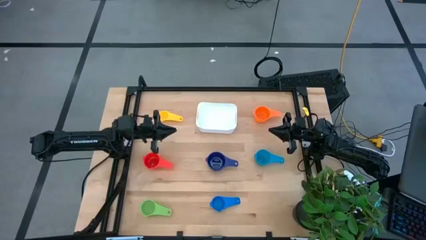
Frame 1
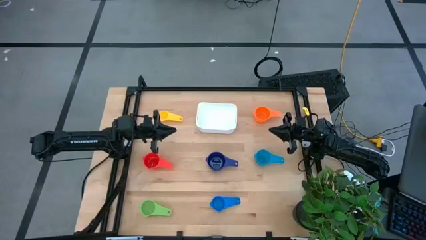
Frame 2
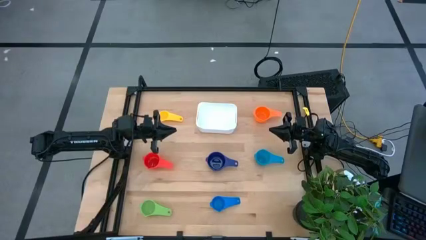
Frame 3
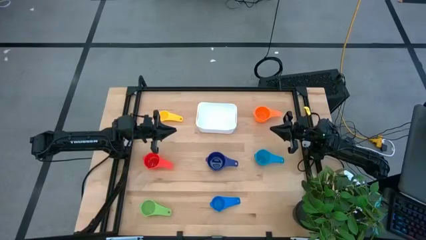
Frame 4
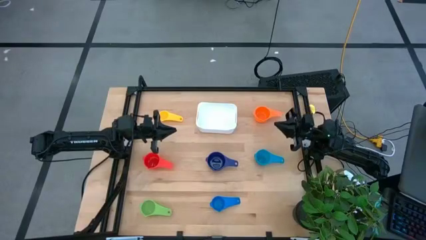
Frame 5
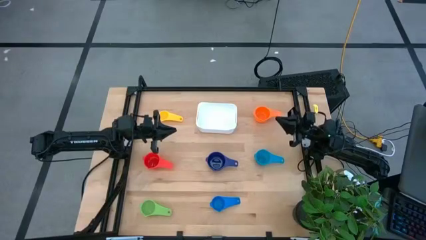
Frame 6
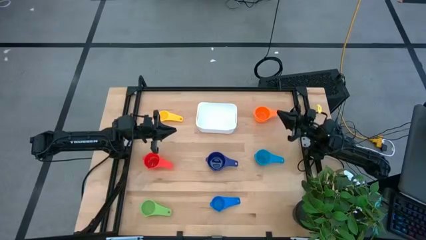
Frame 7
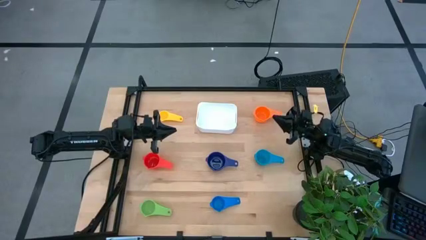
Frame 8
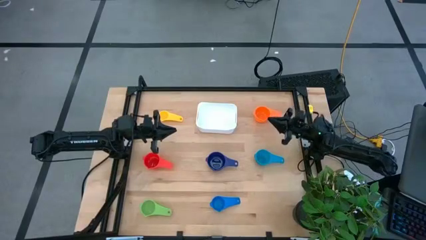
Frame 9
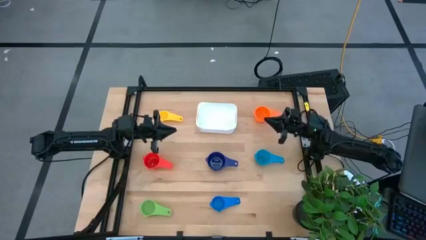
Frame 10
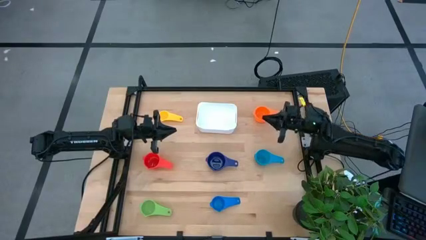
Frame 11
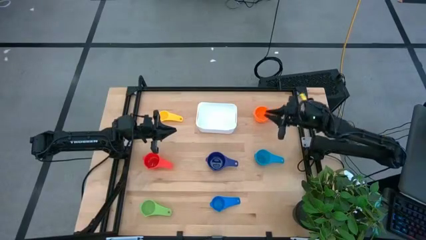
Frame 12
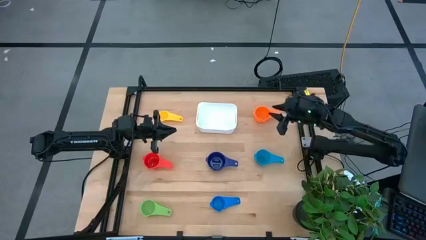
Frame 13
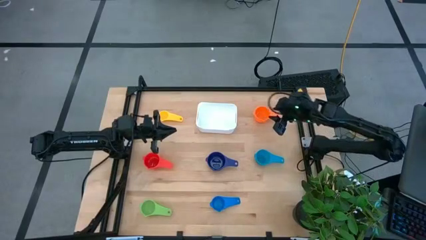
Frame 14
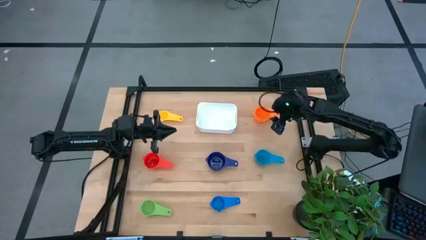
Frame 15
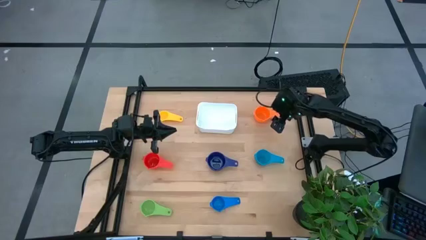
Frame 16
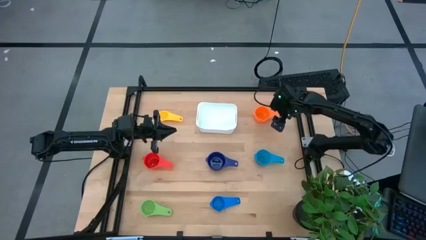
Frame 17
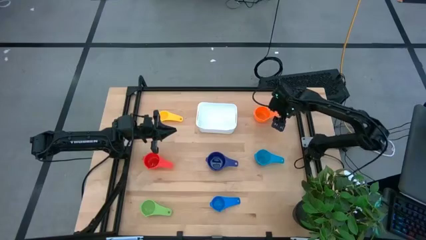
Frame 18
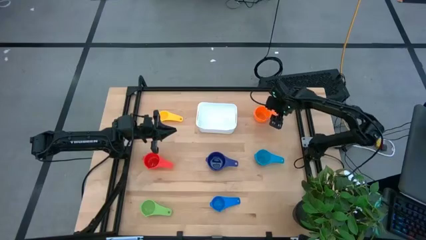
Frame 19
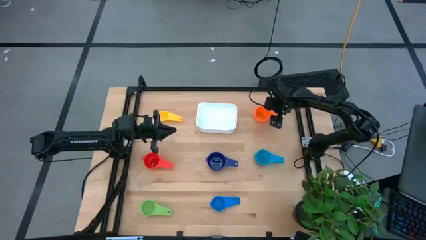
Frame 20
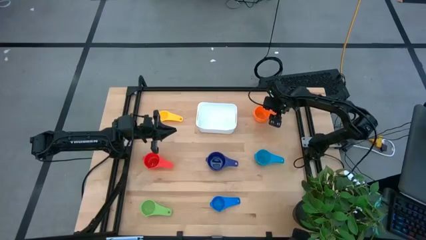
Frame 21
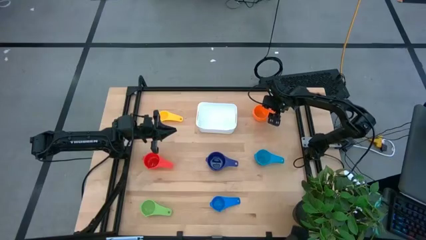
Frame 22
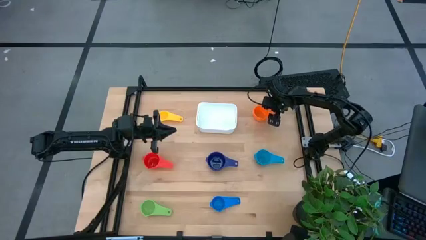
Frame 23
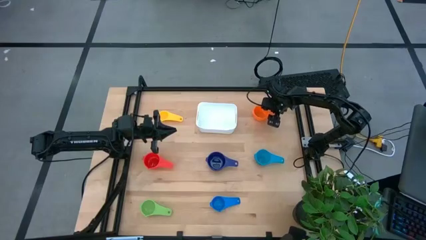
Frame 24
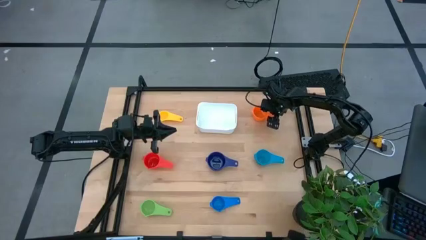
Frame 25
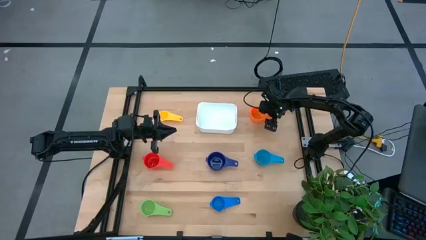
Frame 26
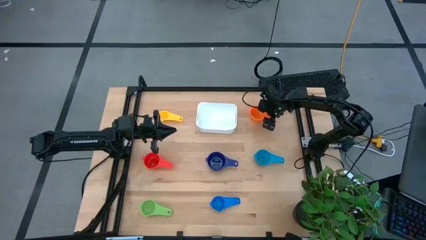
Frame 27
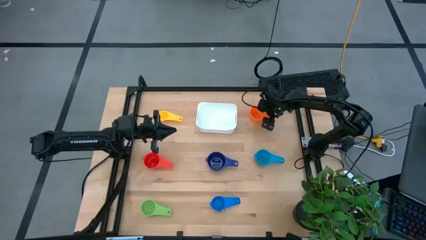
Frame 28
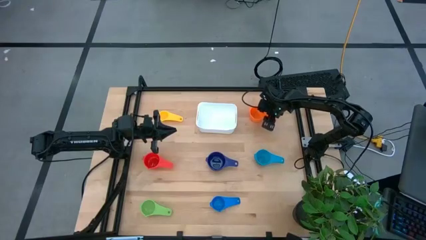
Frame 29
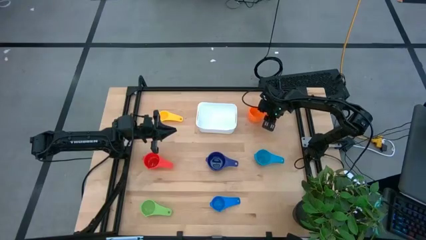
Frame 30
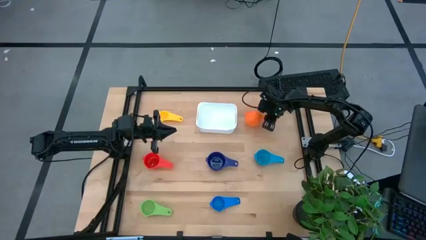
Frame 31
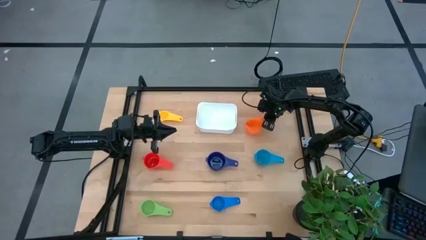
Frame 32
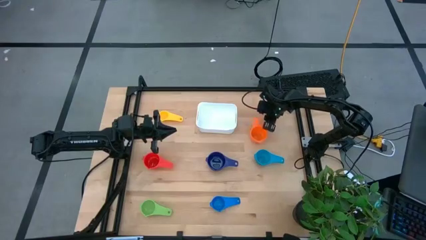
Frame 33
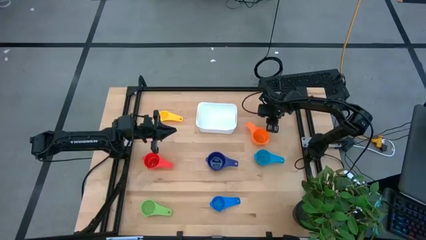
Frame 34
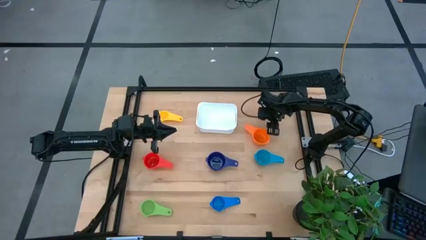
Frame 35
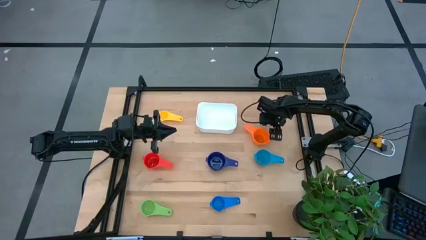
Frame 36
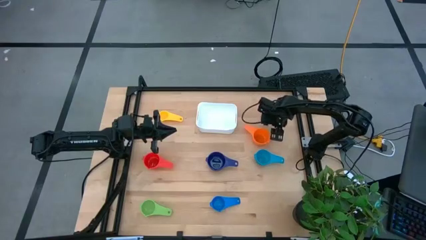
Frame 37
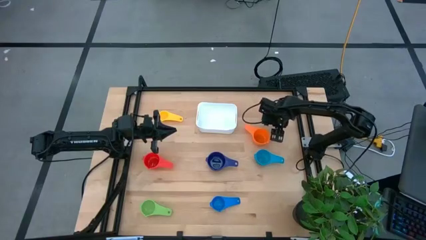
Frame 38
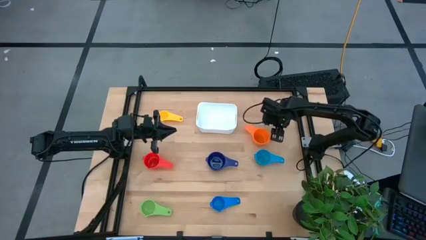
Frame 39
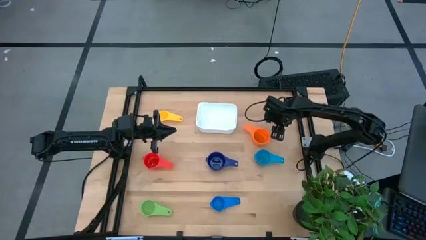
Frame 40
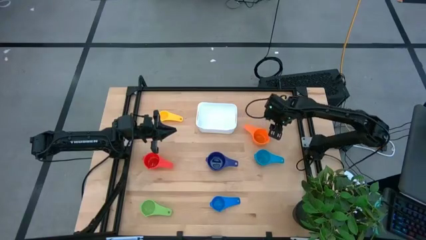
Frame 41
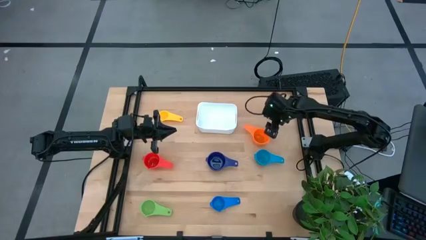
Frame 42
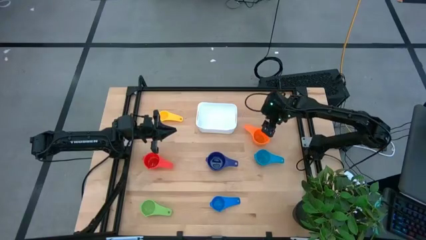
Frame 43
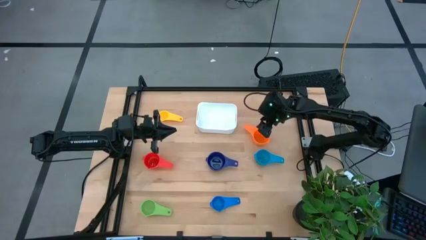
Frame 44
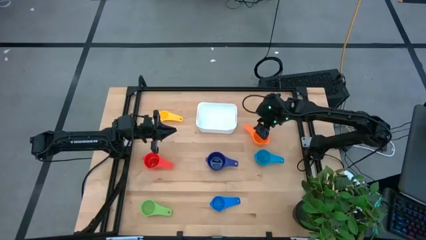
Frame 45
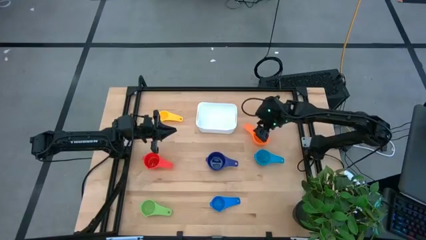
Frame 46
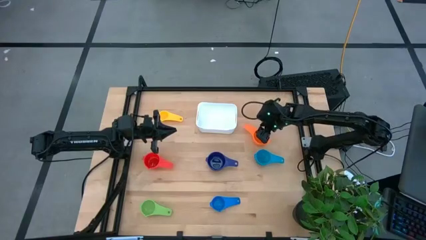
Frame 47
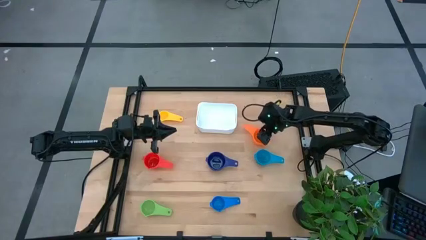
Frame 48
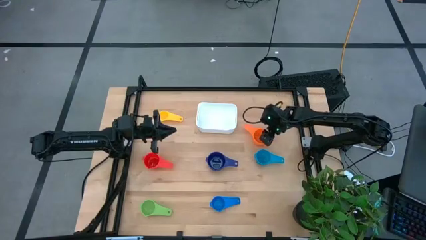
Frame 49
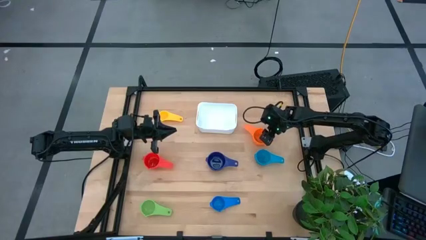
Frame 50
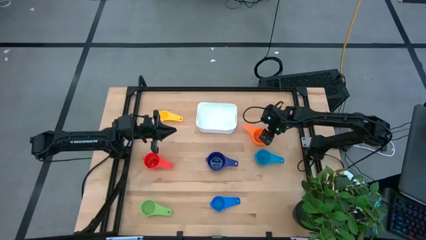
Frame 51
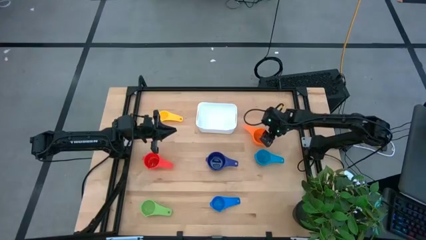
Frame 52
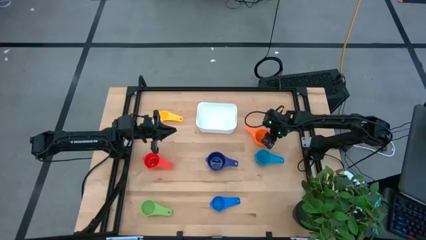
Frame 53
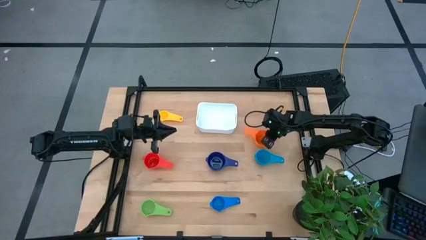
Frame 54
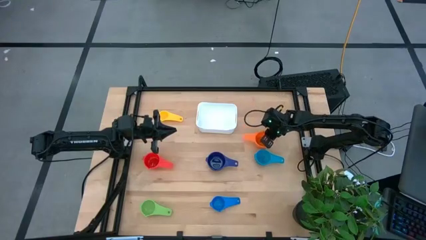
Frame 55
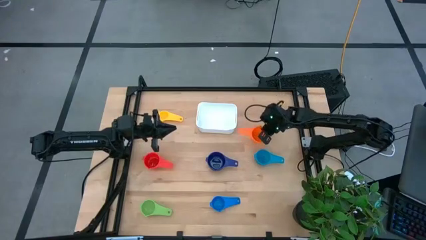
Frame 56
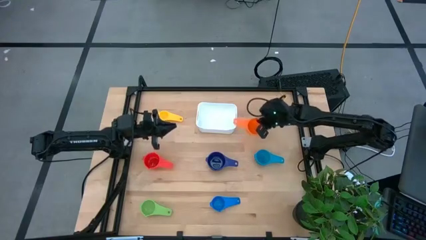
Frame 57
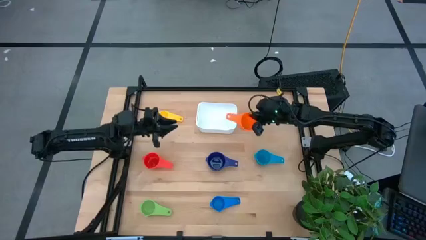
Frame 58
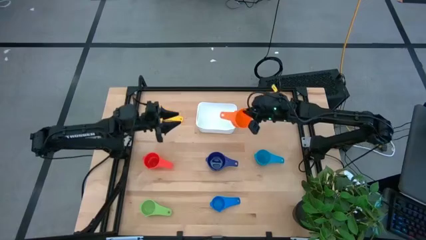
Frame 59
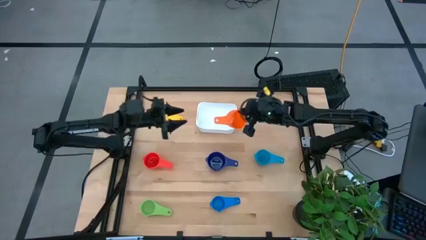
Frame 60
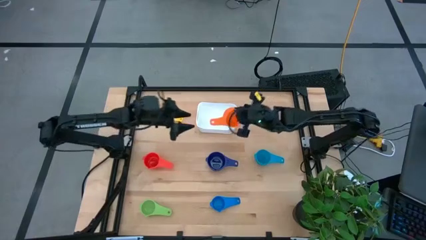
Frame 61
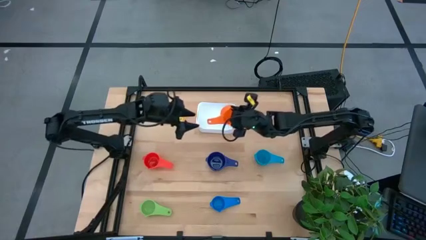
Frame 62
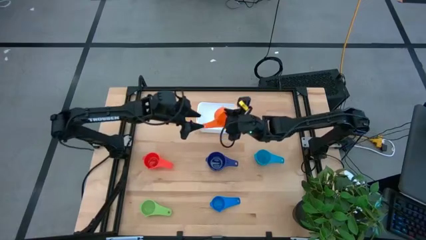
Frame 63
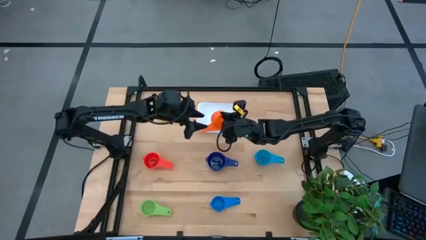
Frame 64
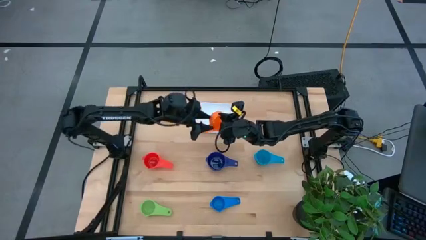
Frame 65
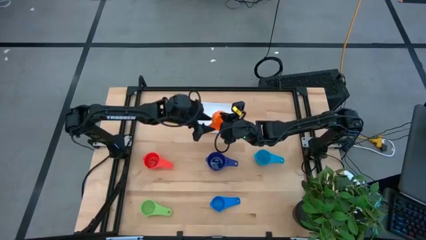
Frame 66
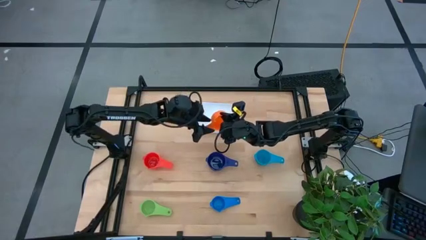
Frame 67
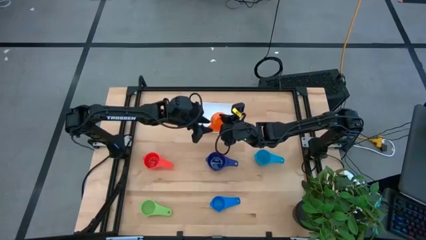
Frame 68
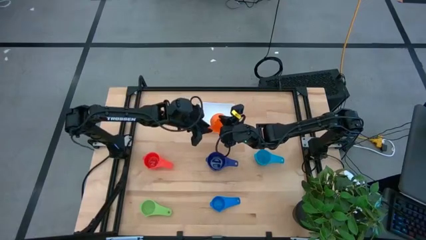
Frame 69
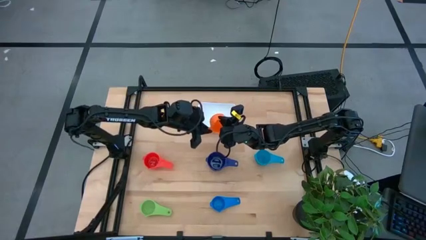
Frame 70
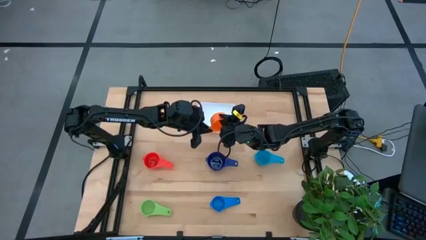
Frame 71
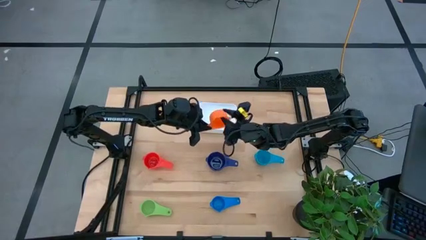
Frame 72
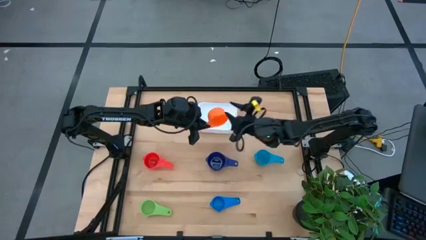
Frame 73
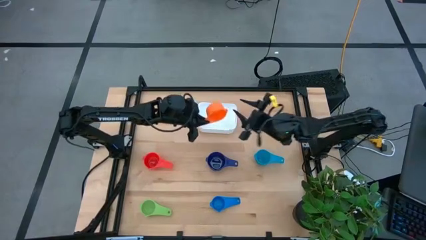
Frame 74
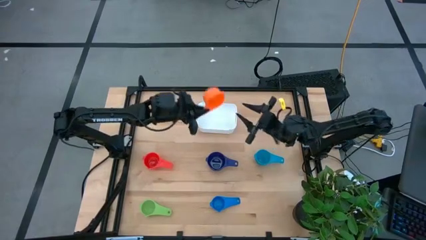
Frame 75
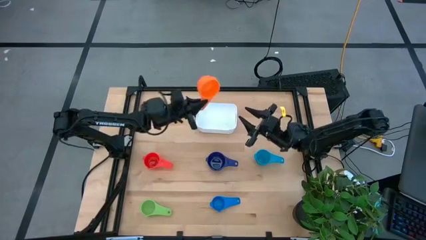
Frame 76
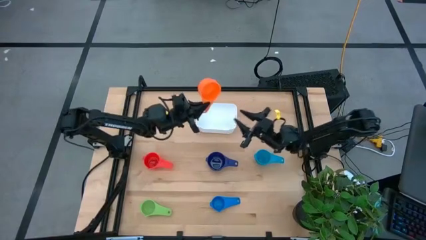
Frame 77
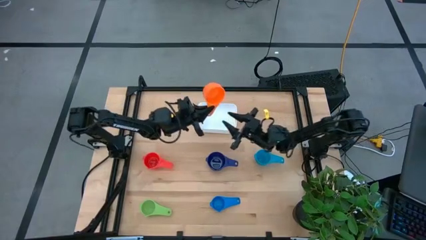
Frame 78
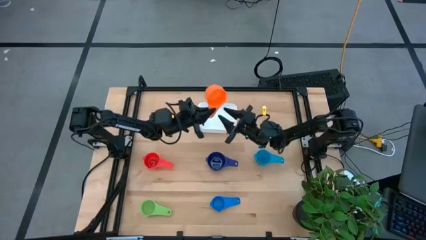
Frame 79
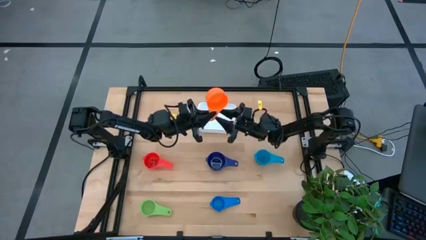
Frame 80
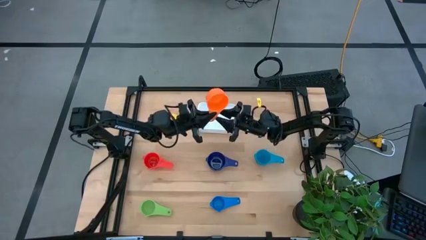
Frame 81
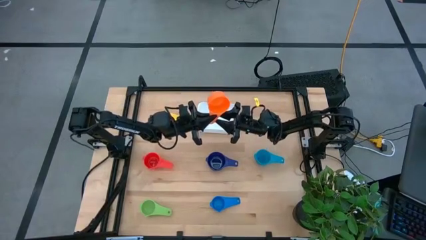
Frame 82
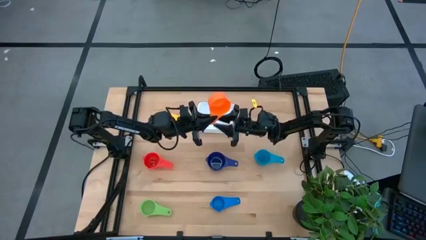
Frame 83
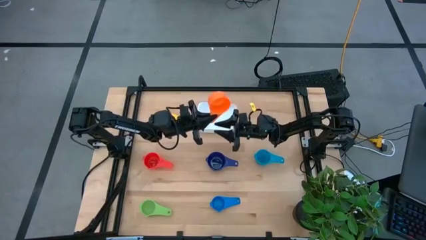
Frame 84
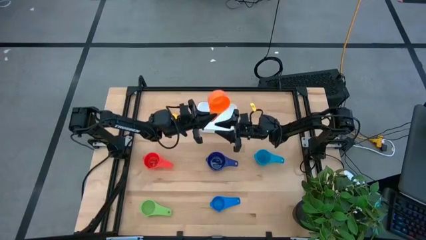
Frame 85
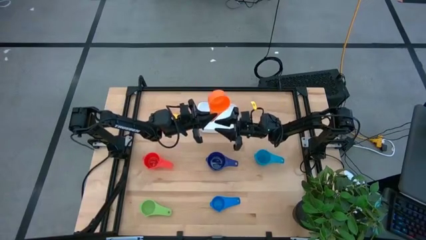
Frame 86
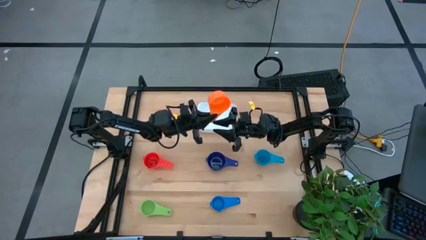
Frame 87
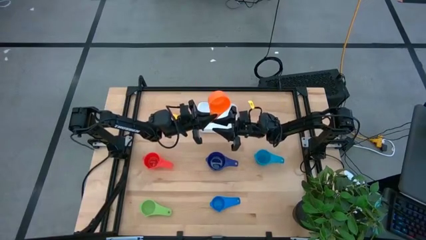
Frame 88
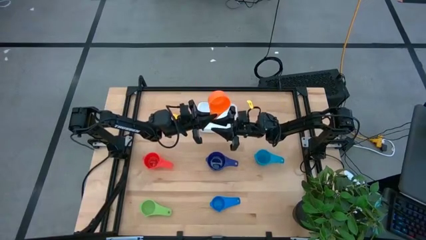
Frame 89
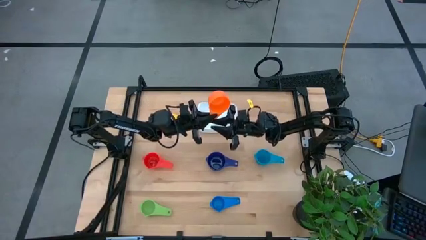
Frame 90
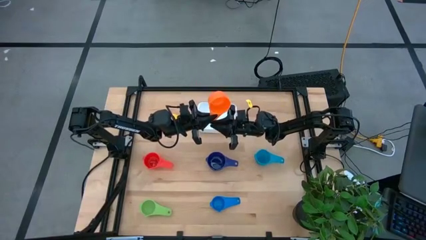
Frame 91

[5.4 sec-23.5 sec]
Task: Nest measuring cups in basket
Stack the orange measuring cup on top of the purple measuring cup
